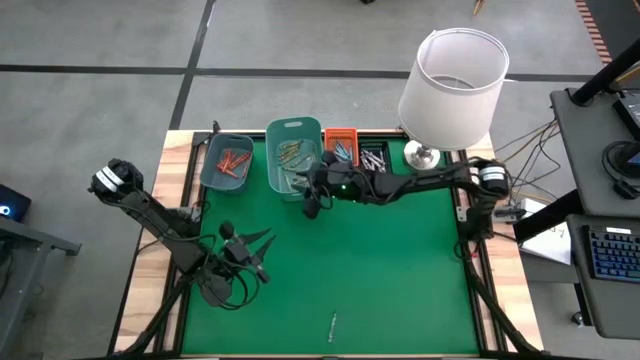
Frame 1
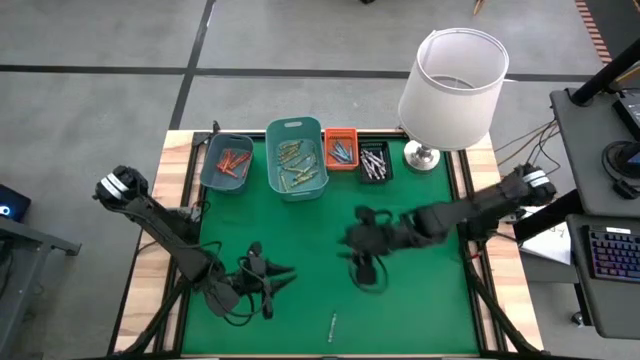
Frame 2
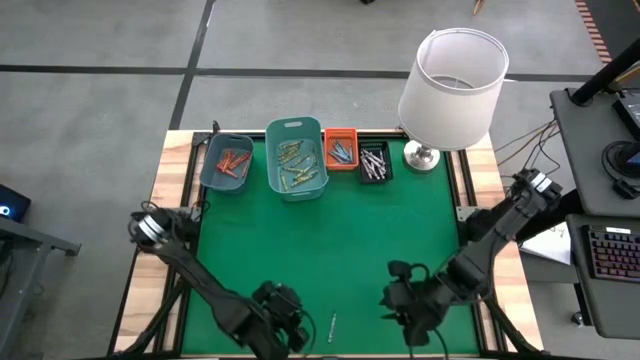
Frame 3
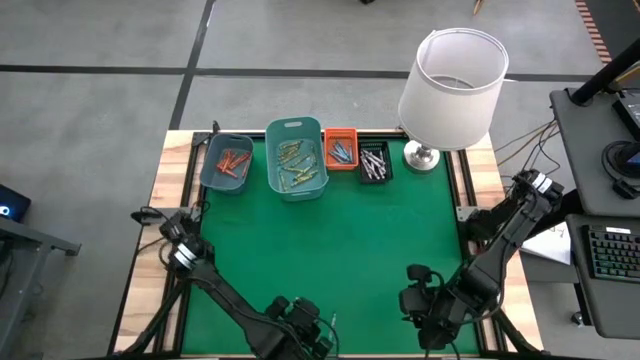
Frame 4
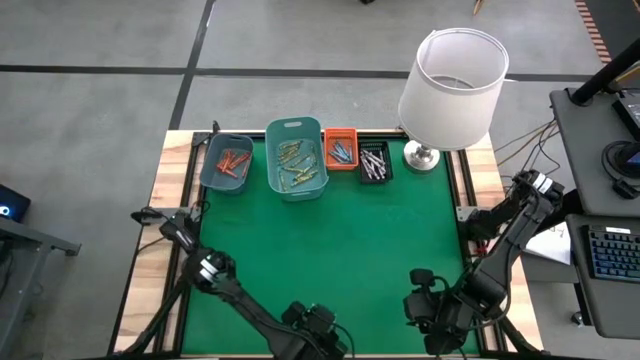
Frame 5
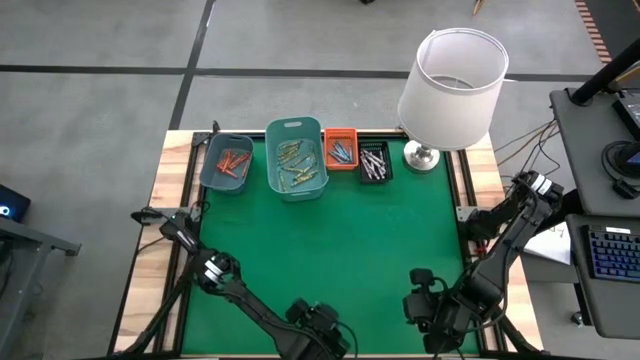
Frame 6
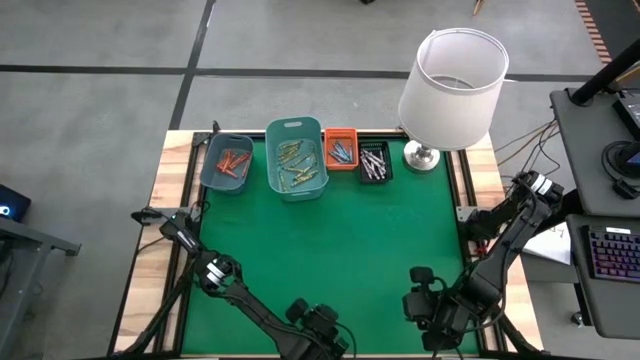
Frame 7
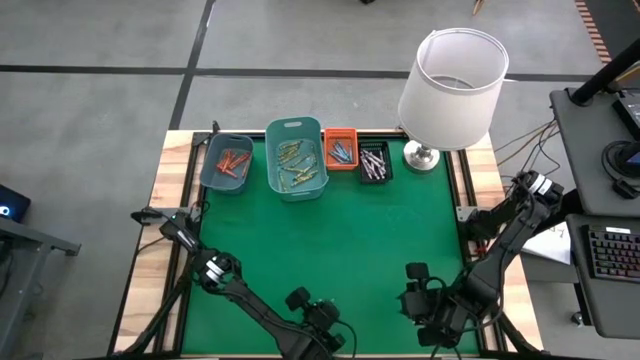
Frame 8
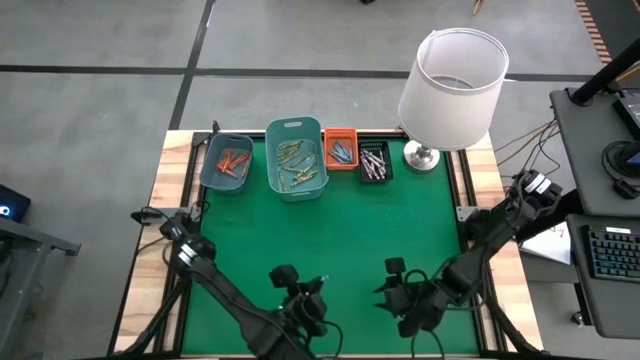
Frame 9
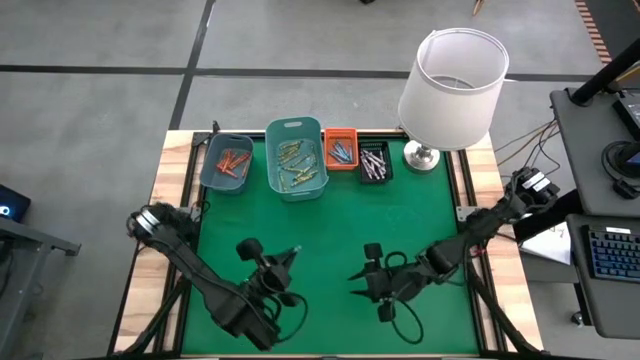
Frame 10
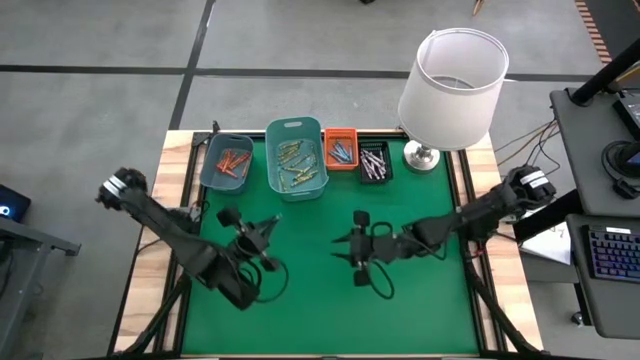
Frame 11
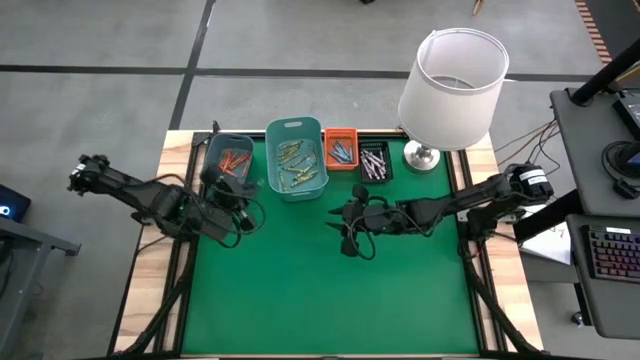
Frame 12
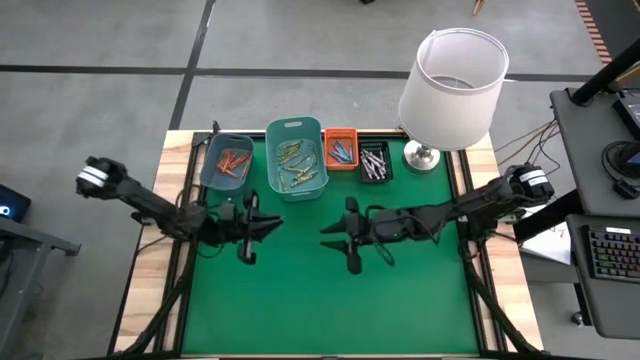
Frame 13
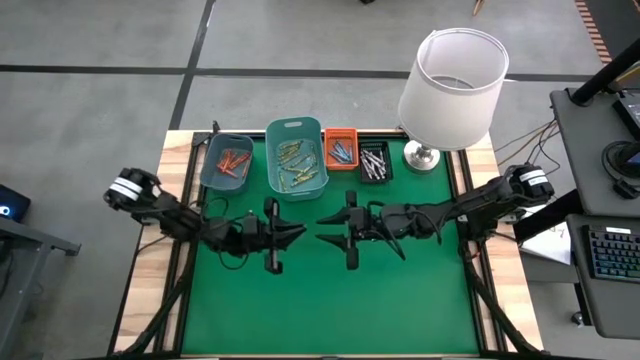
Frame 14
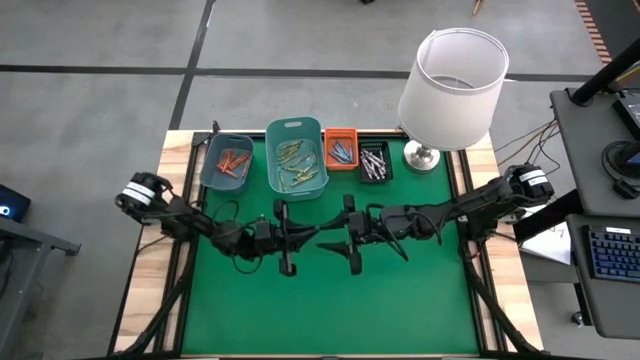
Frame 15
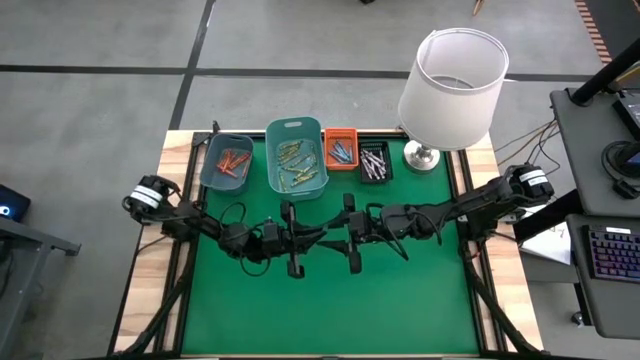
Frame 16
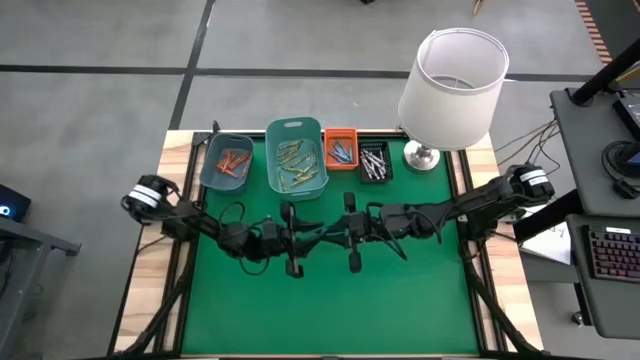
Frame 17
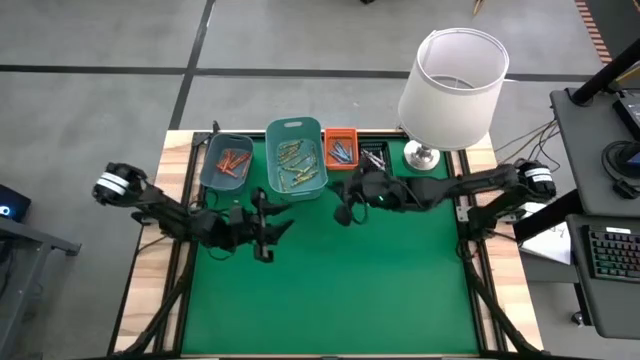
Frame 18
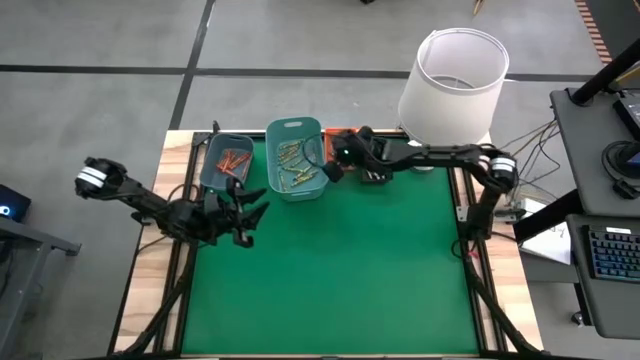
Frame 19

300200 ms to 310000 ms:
Task: Sort crayons
Put the blue crayon into the orange bin

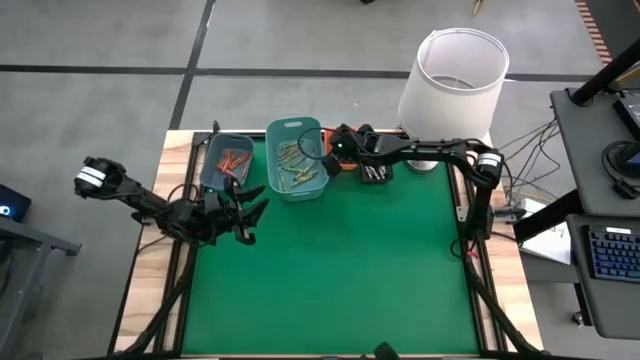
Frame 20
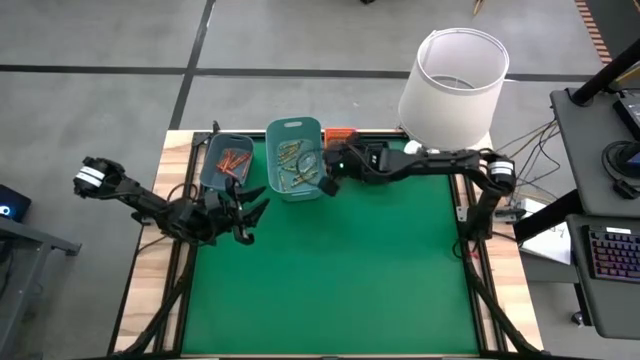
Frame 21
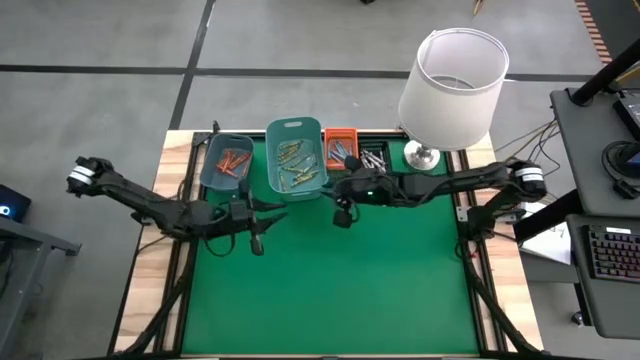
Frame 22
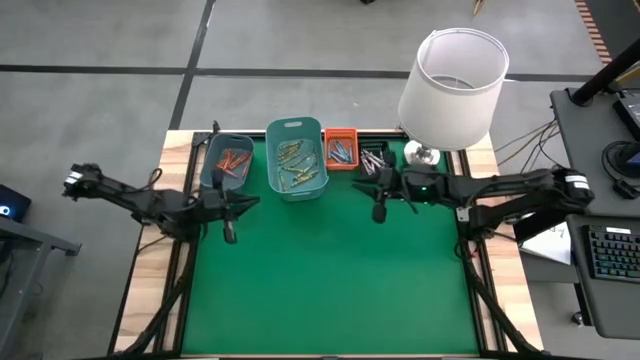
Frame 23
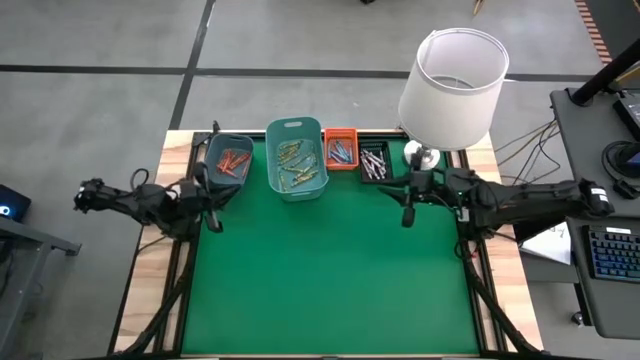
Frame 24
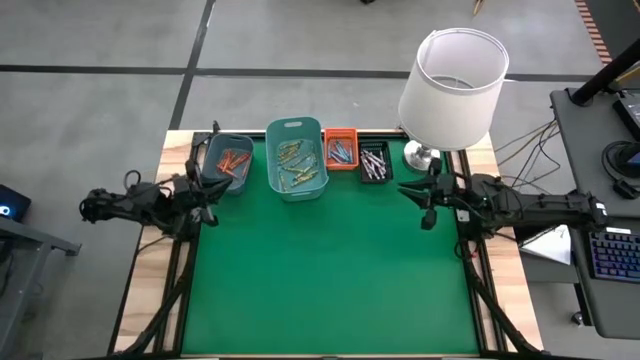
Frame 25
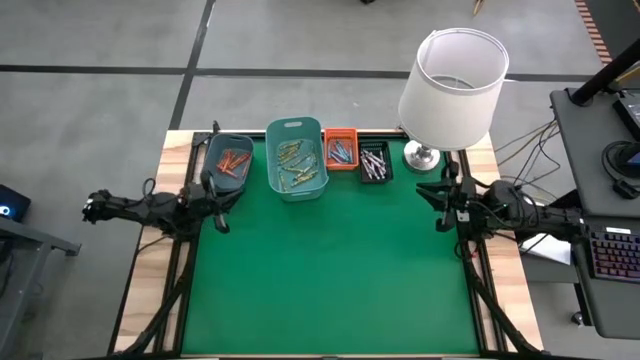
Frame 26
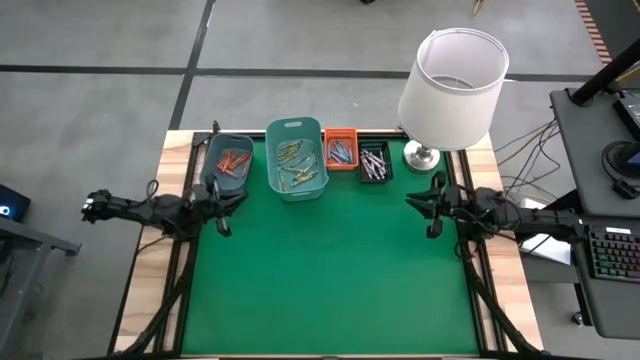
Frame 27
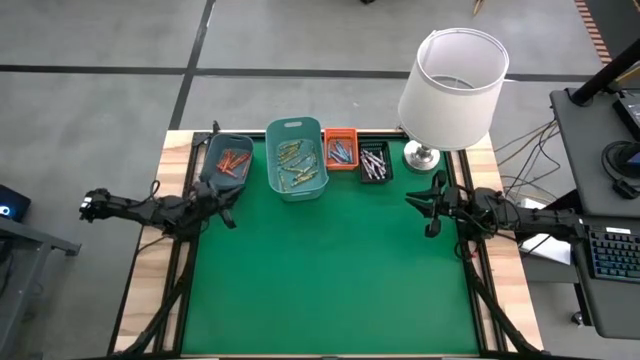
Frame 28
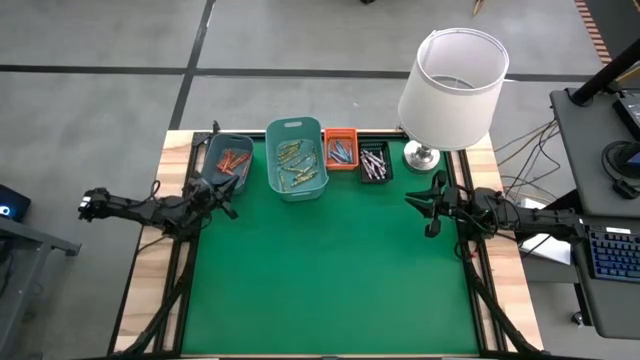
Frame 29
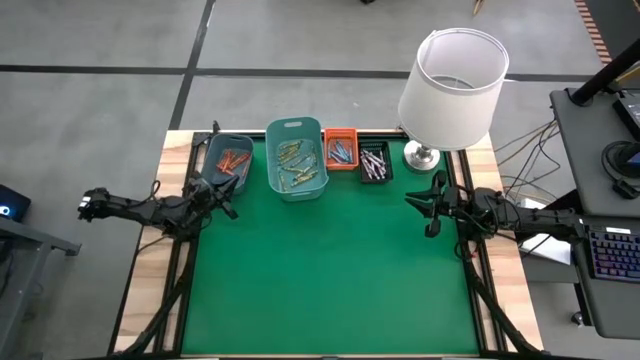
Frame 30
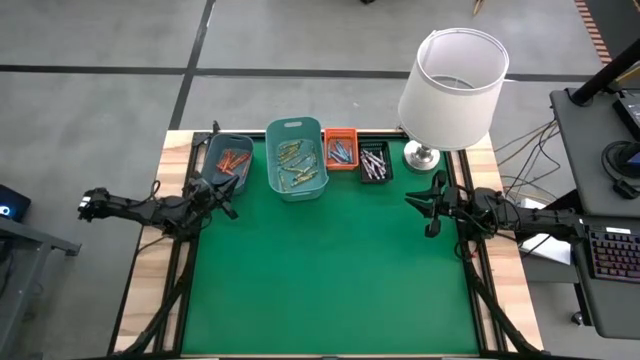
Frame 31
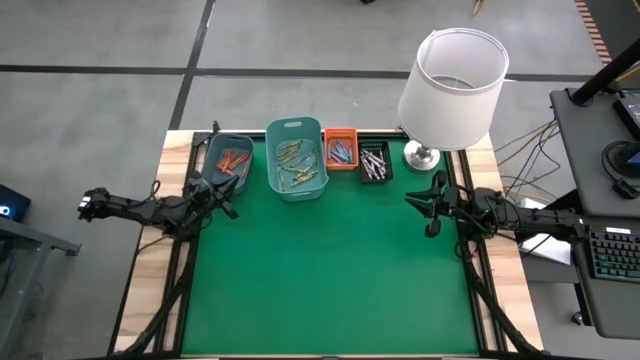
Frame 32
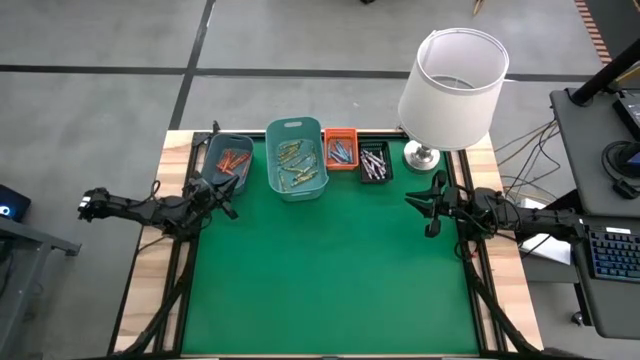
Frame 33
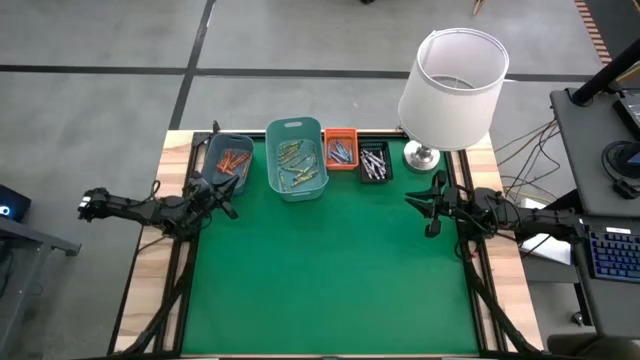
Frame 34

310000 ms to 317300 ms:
Return to Home Position

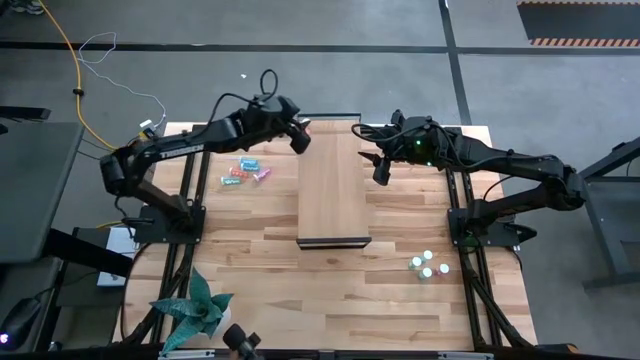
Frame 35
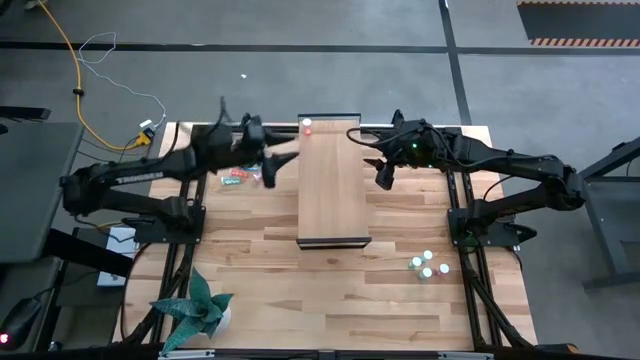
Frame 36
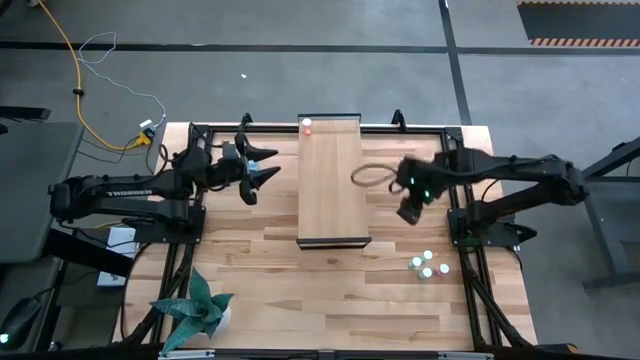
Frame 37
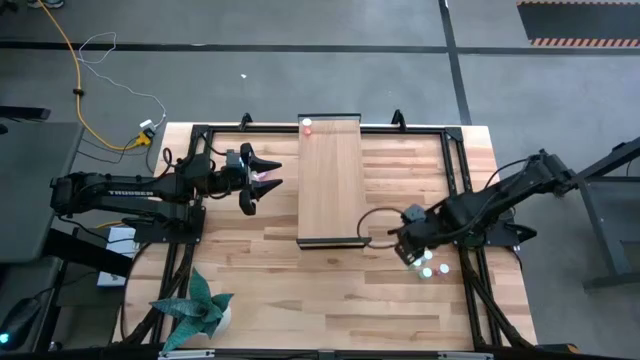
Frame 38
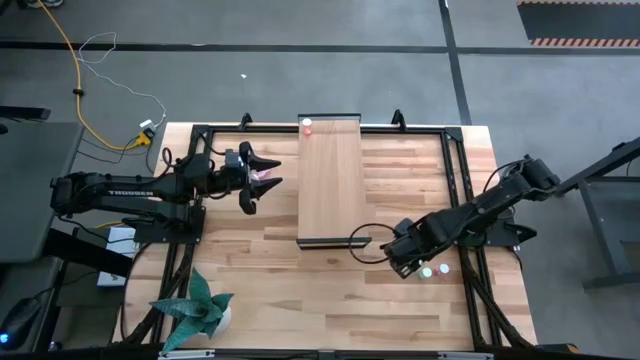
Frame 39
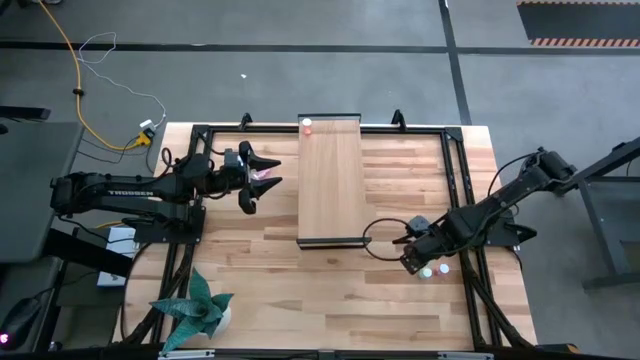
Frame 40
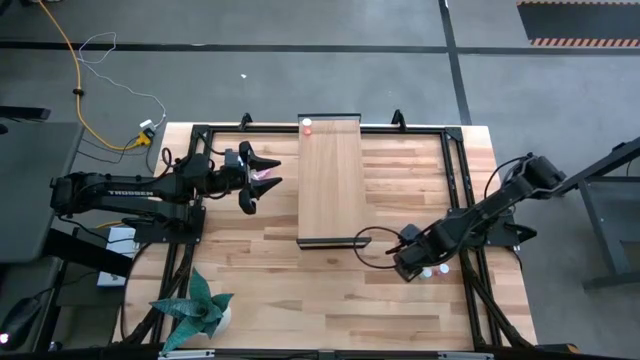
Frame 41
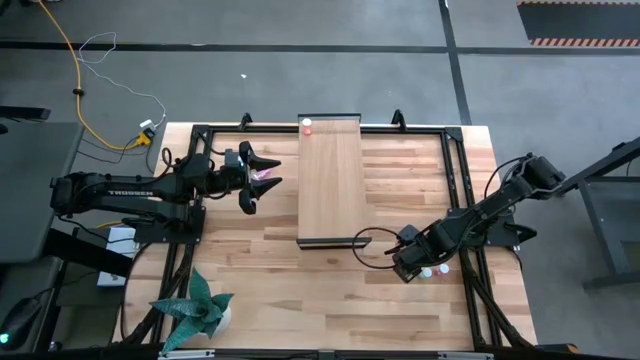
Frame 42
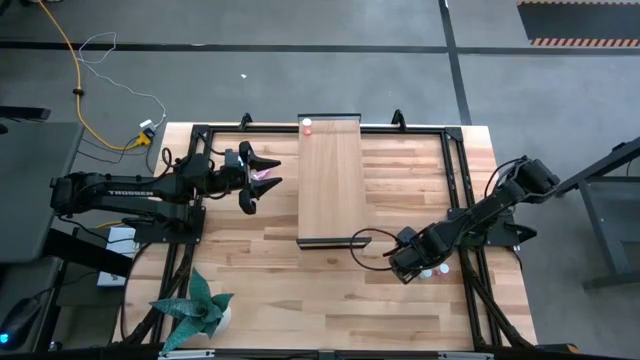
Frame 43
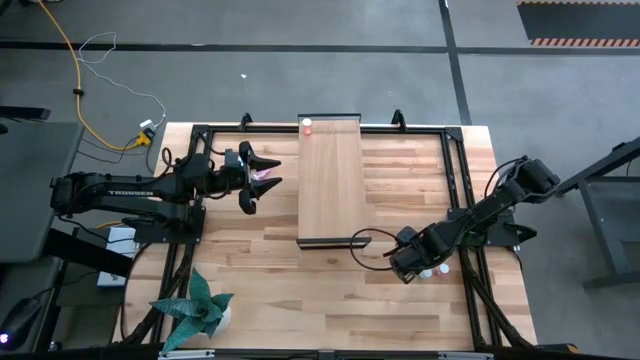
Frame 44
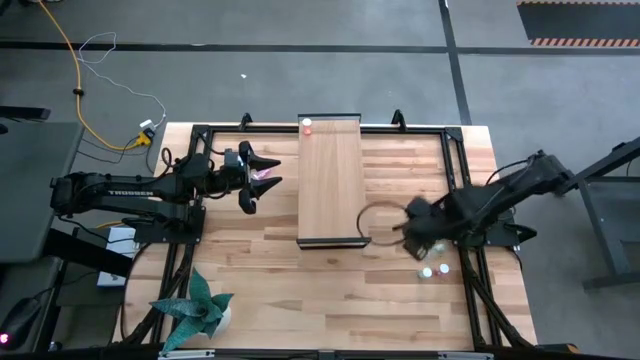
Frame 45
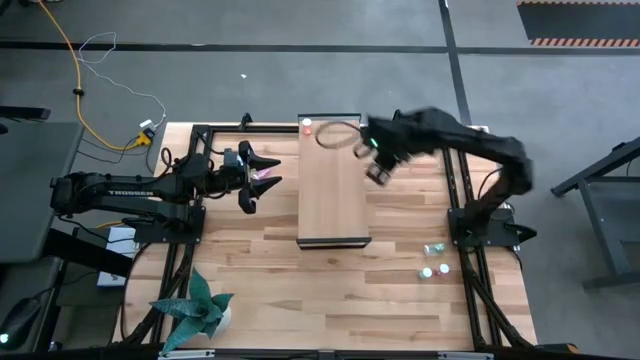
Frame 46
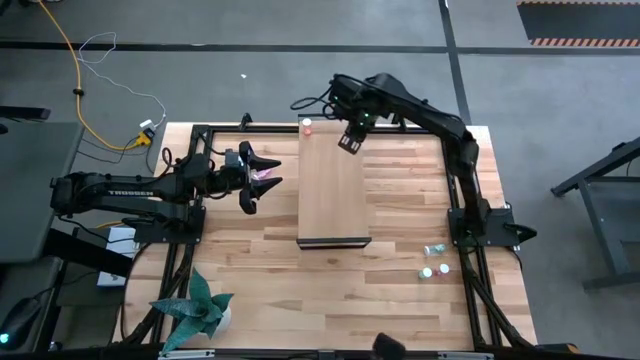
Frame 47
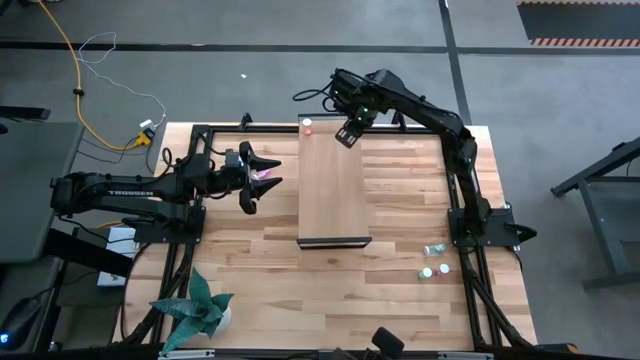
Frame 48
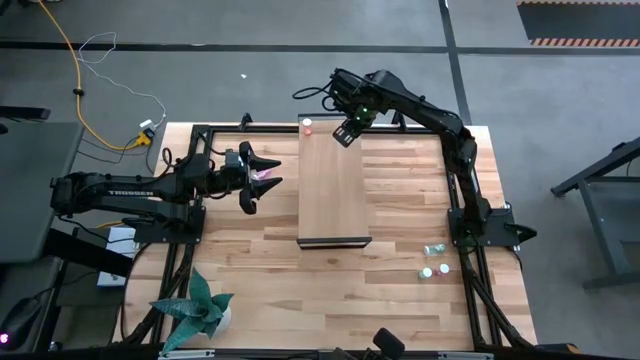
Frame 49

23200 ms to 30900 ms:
Task: Pick and place medicine bottles onto shelf by color
Put the transparent green pill bottle on the shelf
